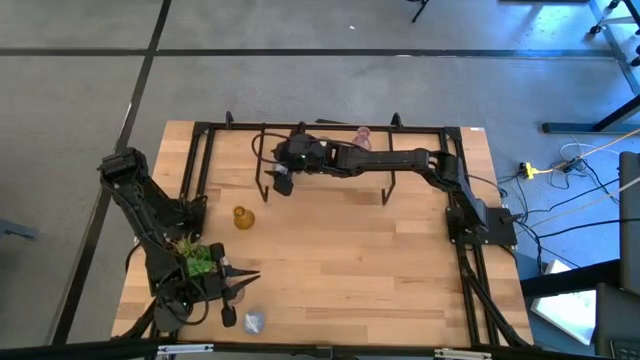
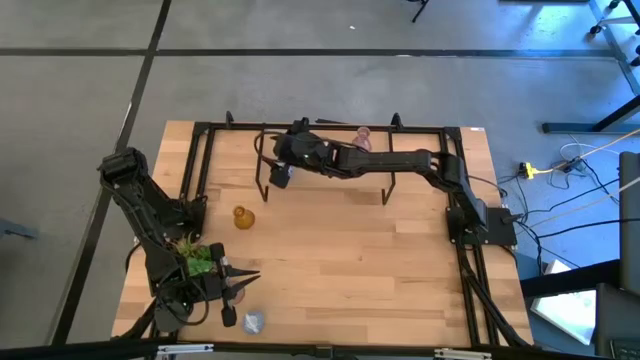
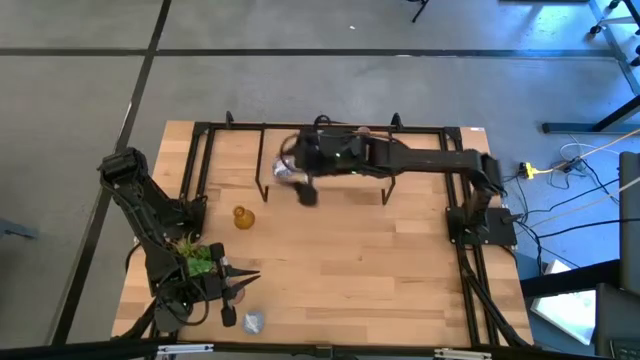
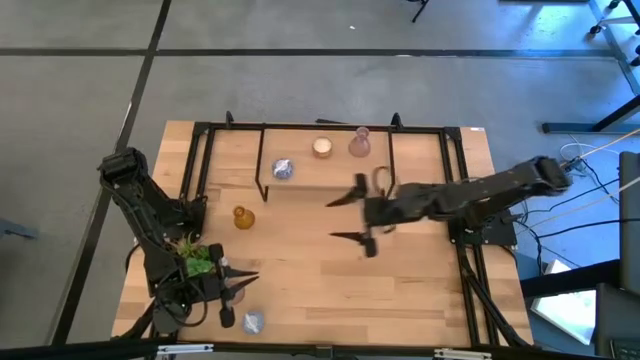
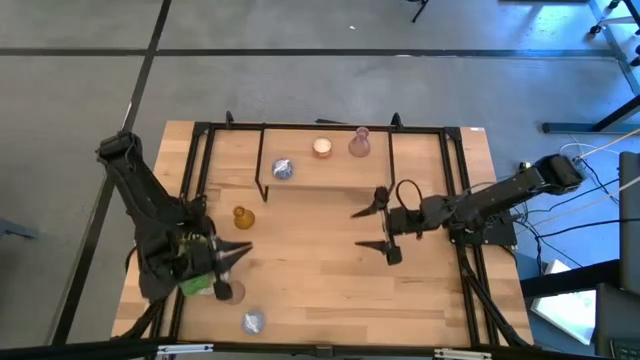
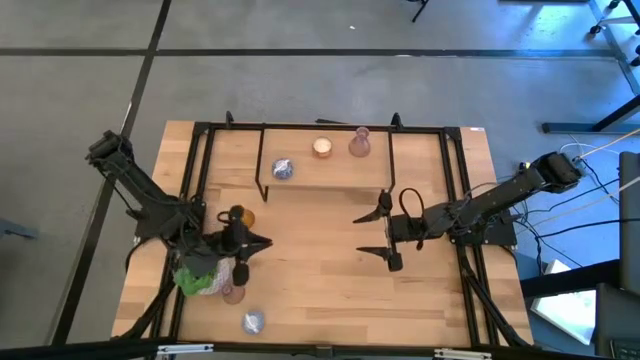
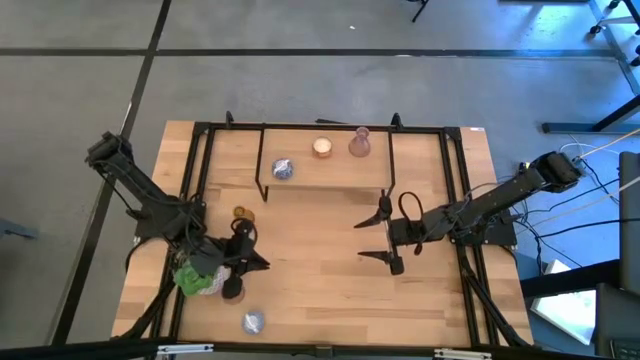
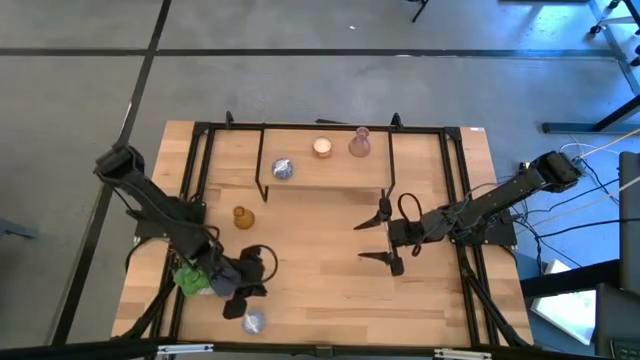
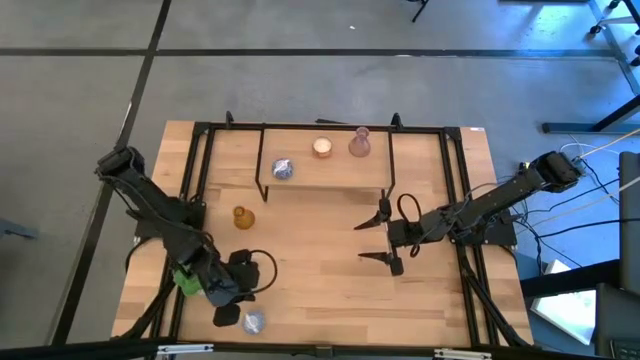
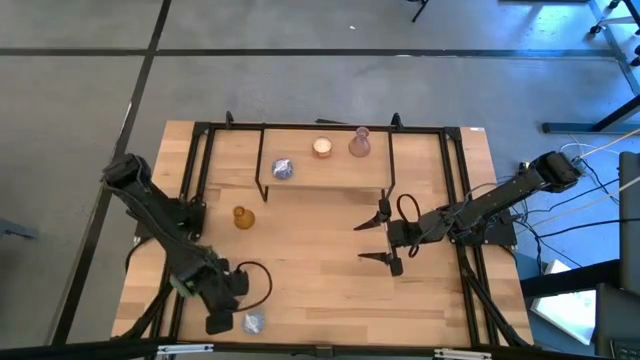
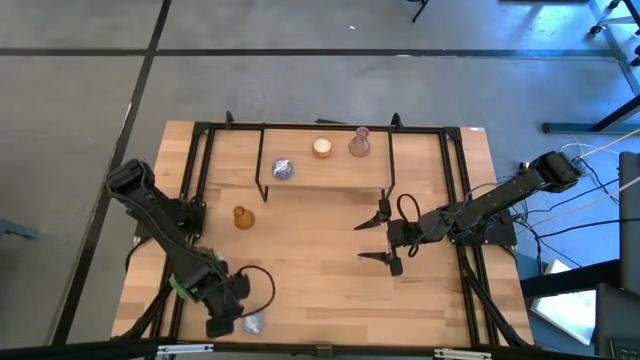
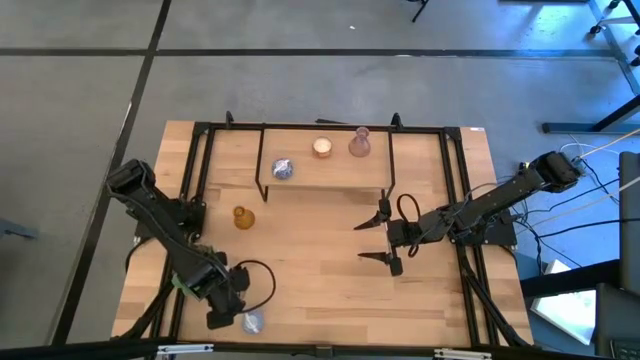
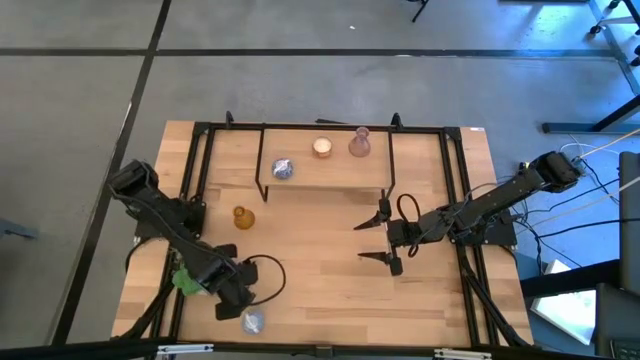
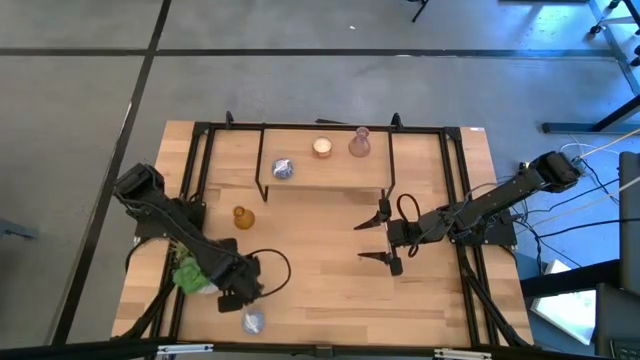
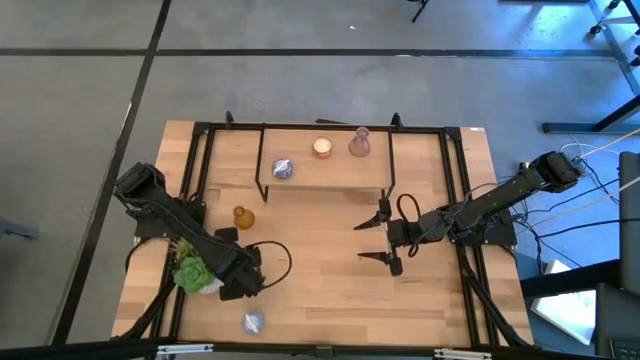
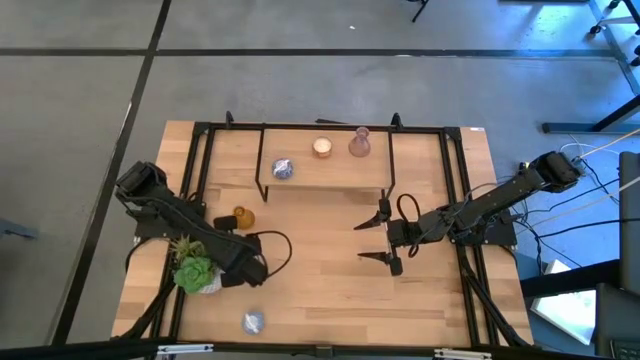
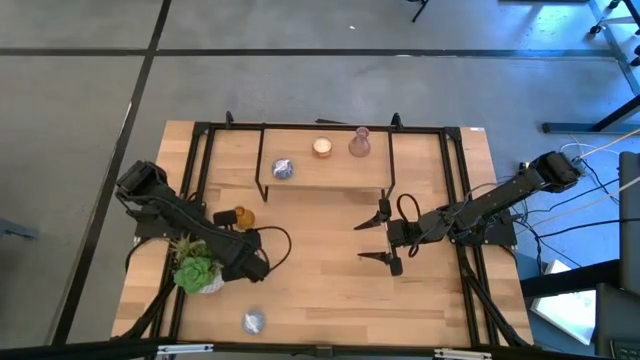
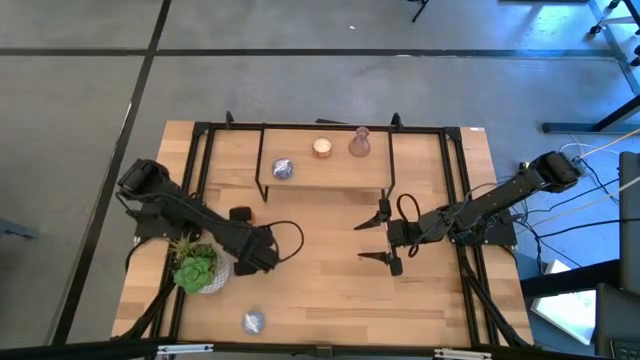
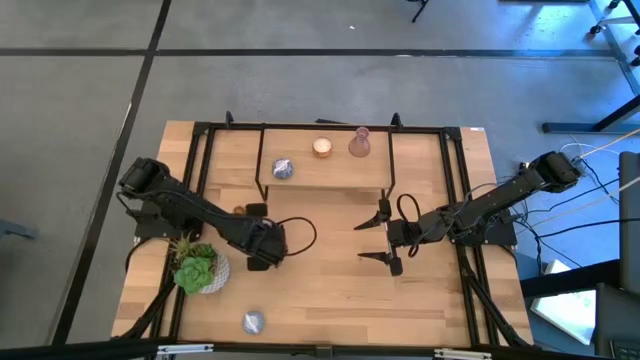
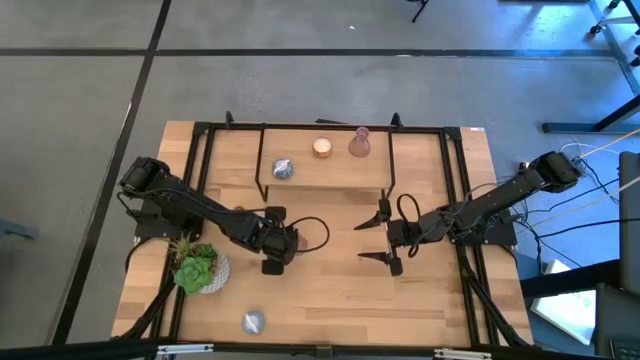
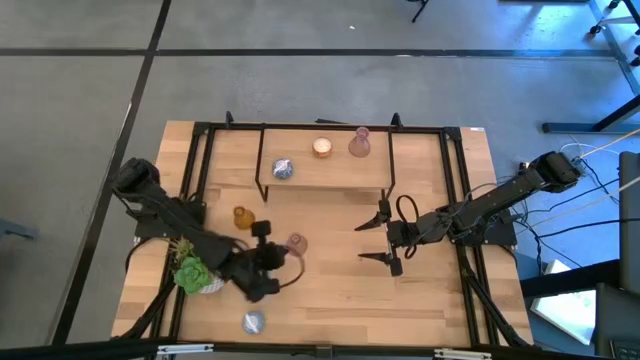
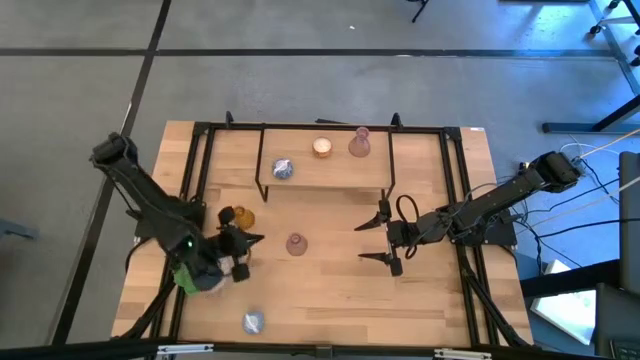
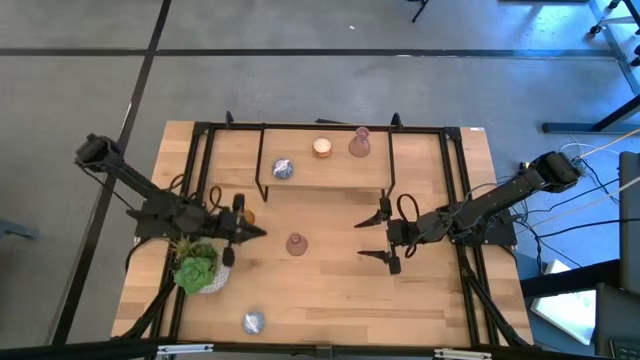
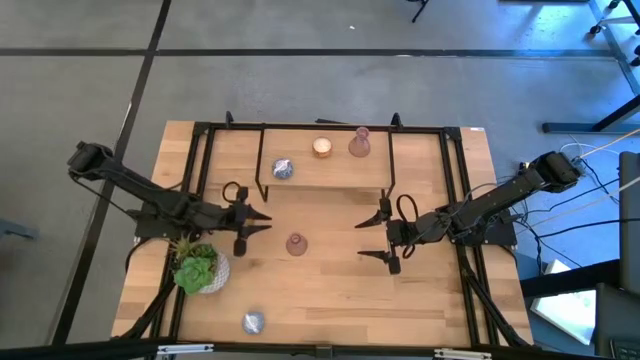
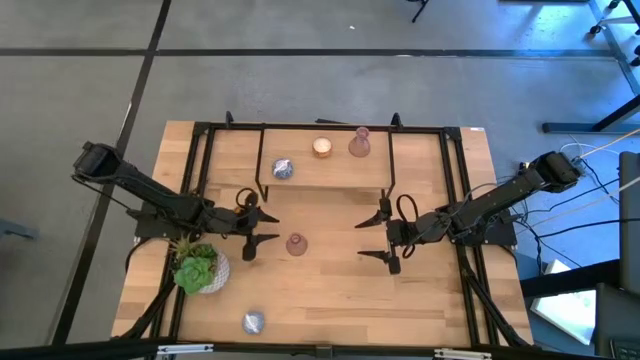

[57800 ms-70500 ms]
Task: Pick & Place candle stick holders
Put the pink glass candle holder on the shelf

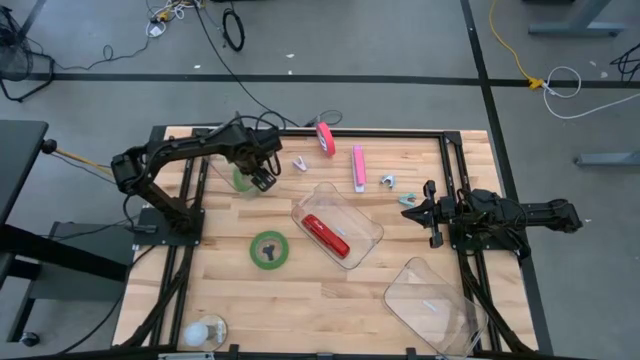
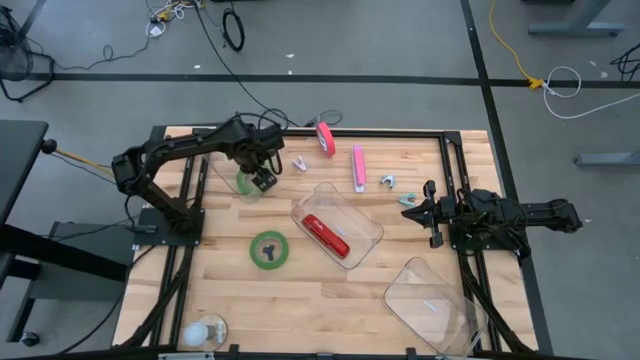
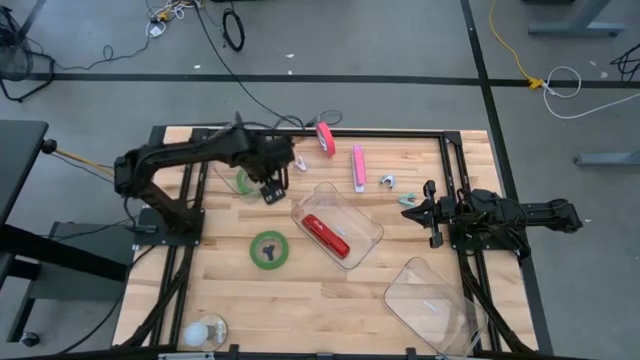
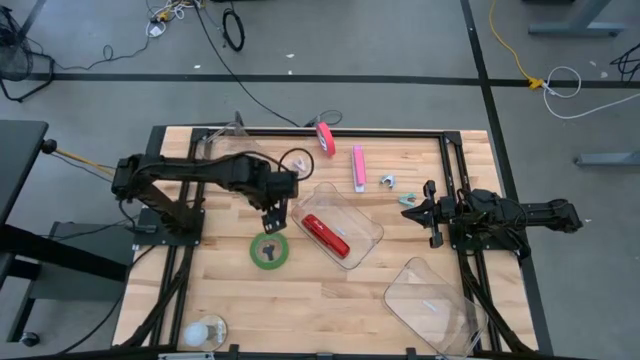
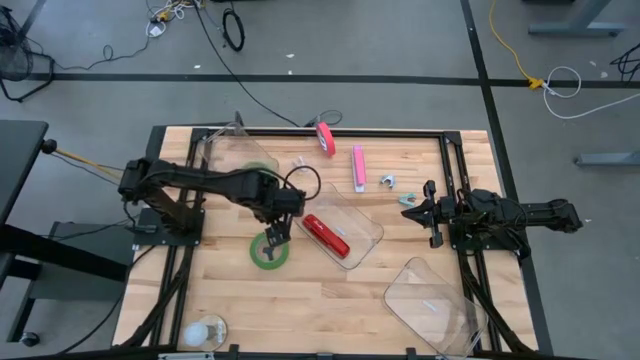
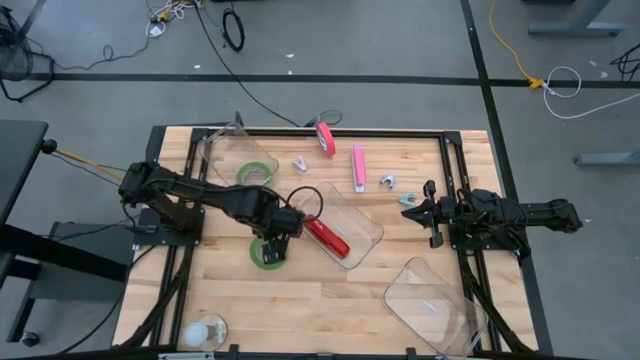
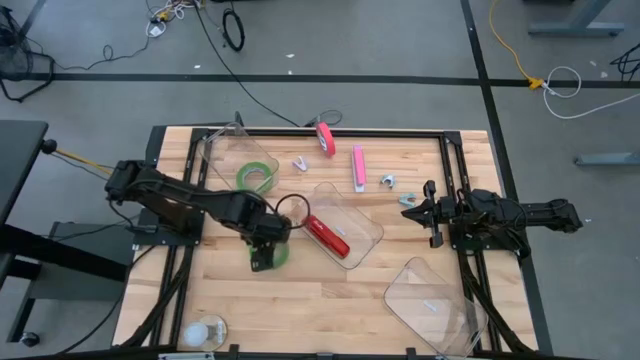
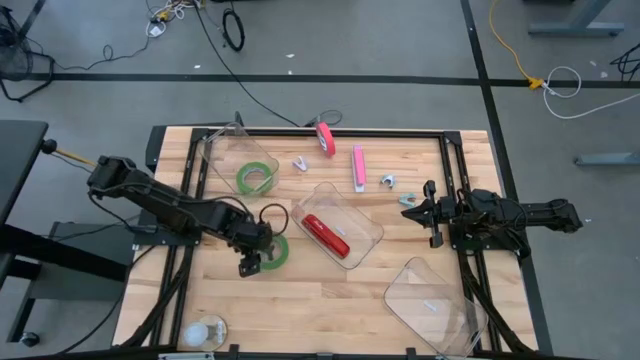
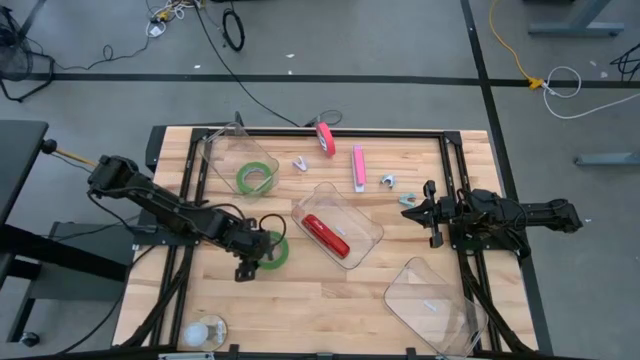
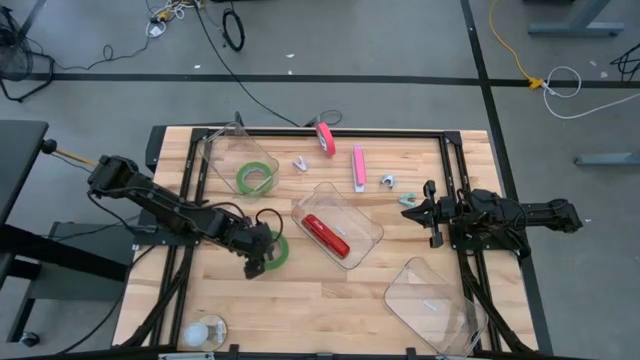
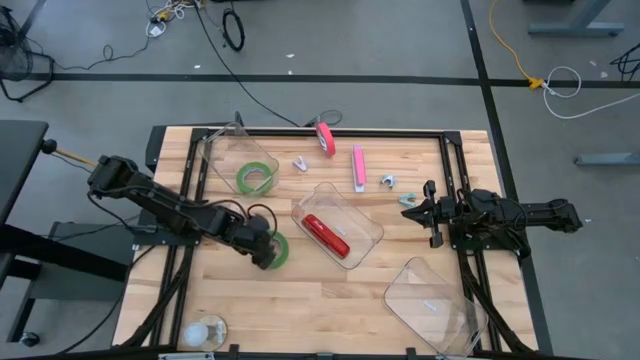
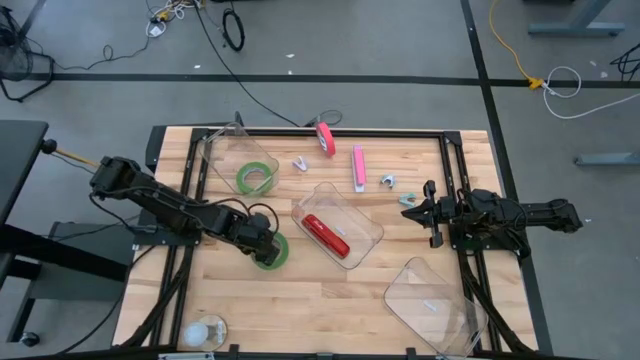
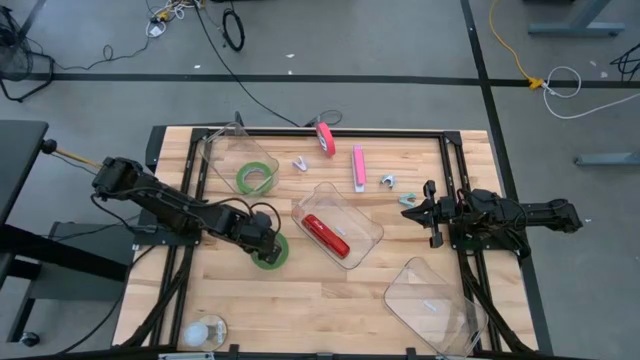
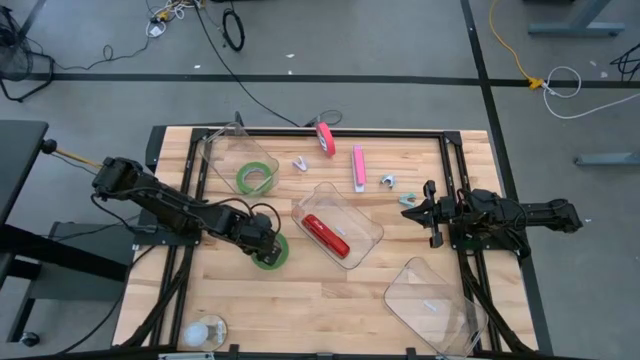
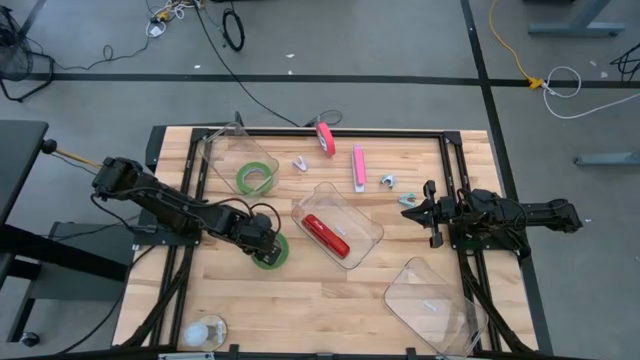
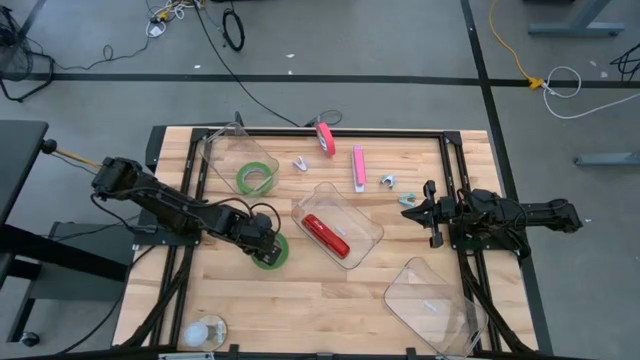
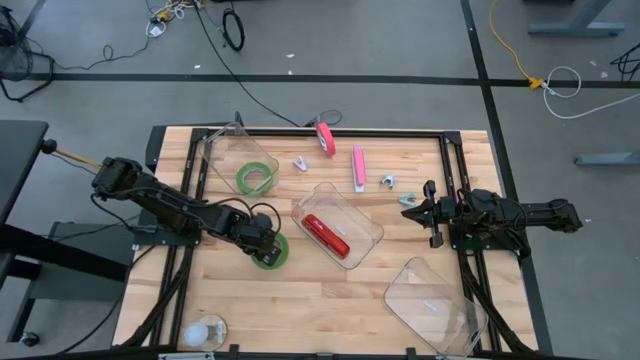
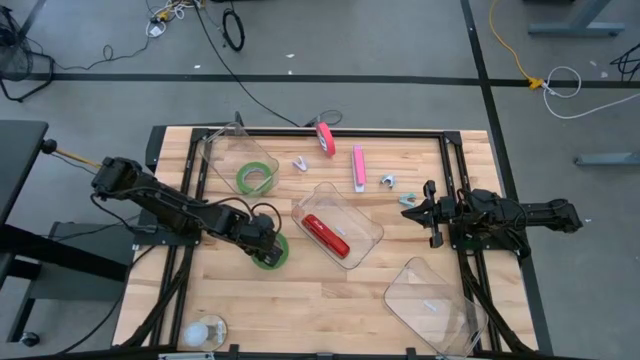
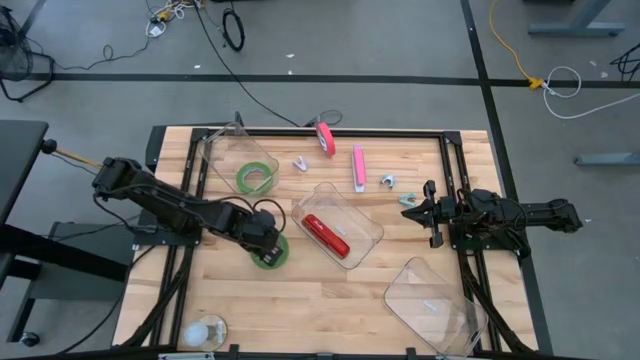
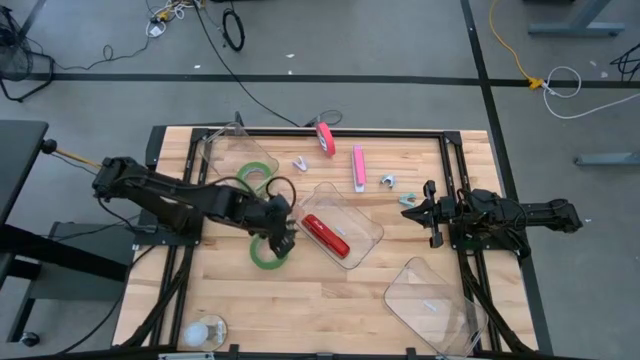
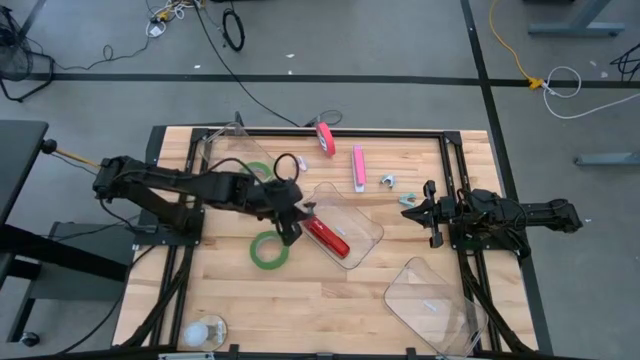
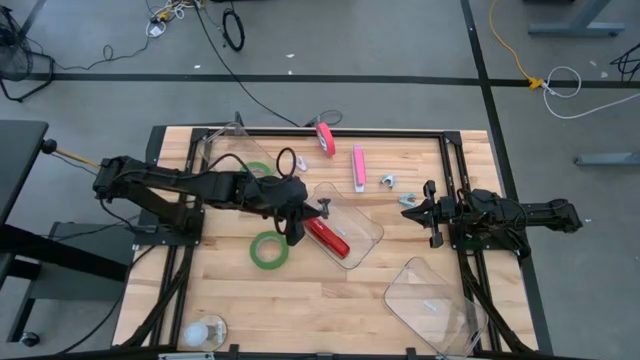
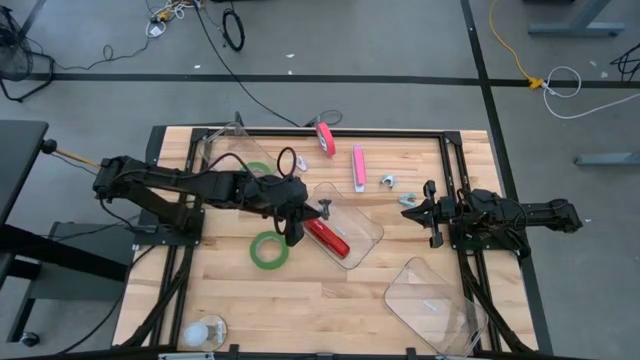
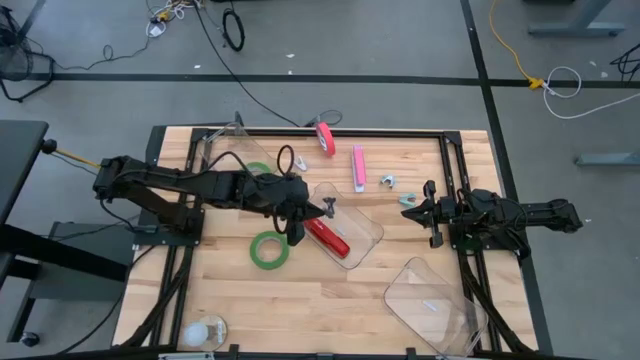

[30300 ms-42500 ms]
Task: Pick and place Stapler, Stapler remover, tape
Put the black staple remover into the bottom transparent bin
